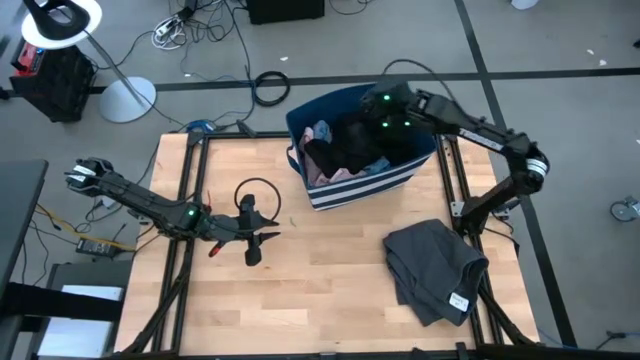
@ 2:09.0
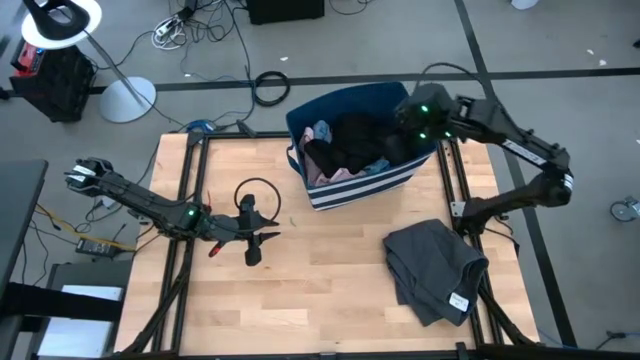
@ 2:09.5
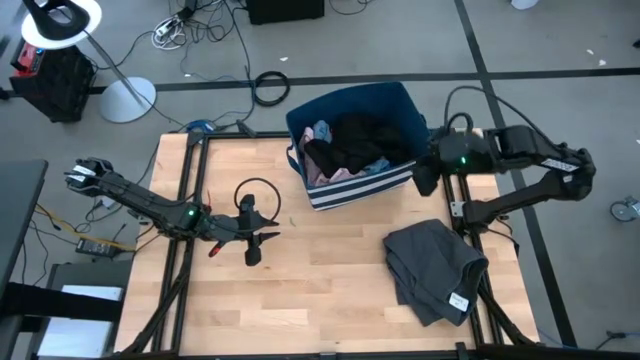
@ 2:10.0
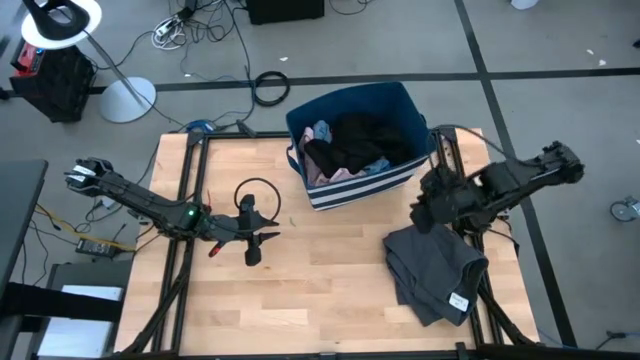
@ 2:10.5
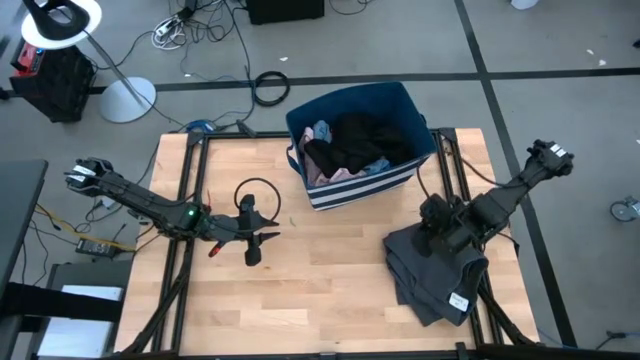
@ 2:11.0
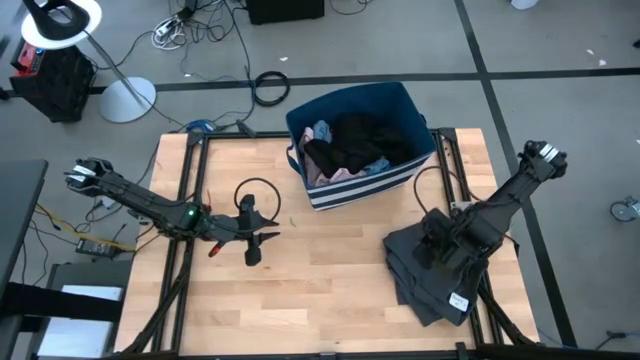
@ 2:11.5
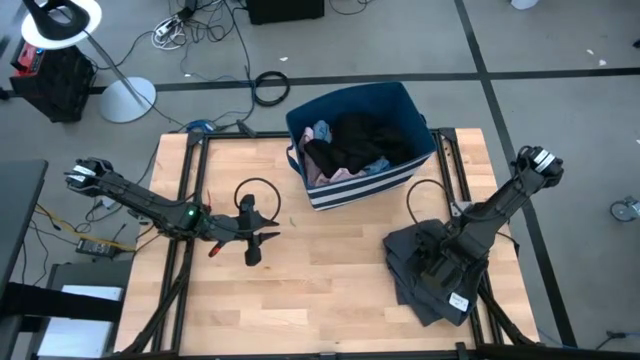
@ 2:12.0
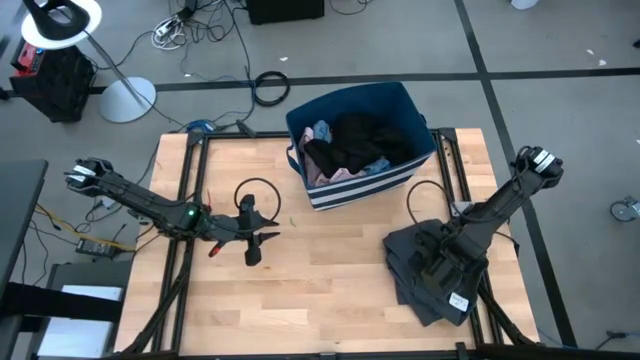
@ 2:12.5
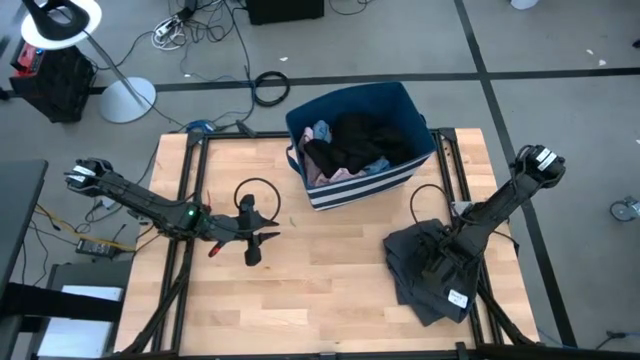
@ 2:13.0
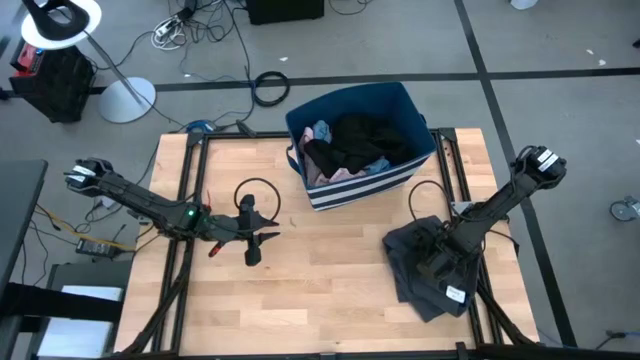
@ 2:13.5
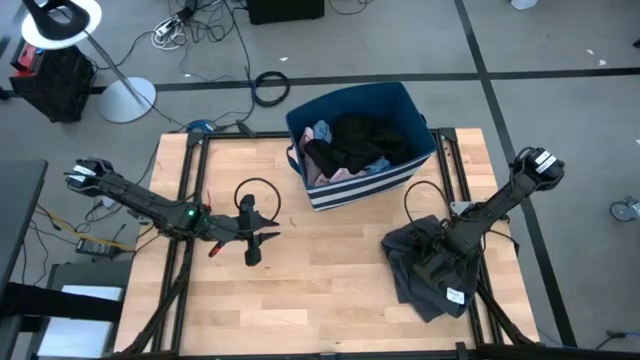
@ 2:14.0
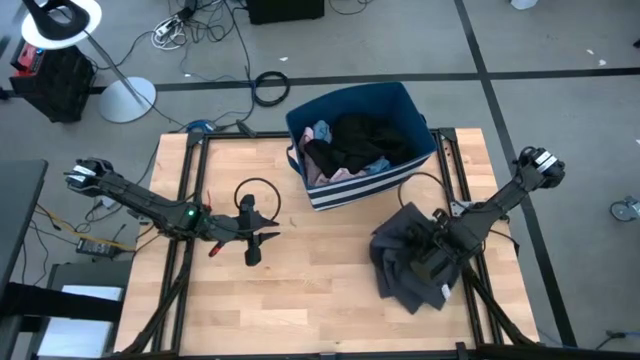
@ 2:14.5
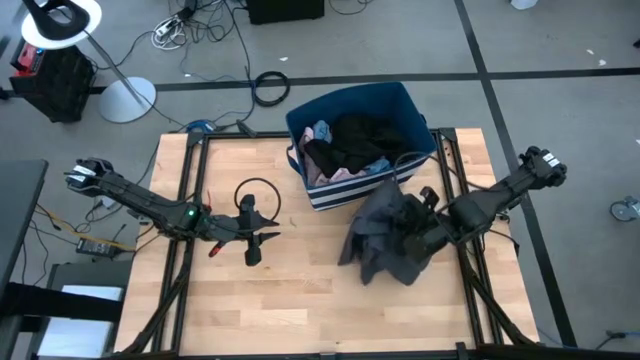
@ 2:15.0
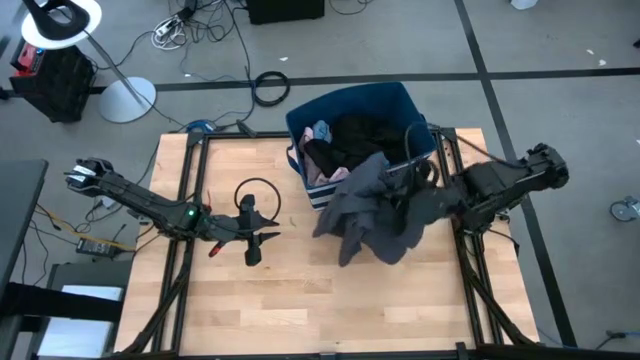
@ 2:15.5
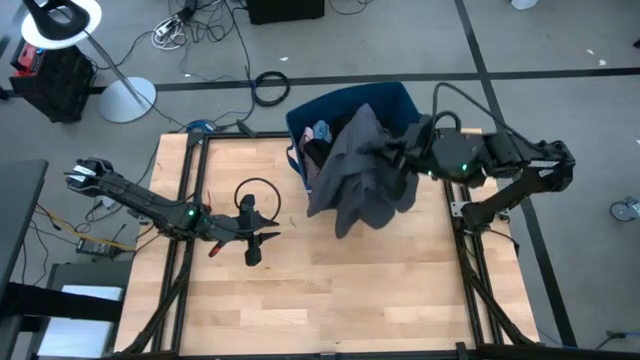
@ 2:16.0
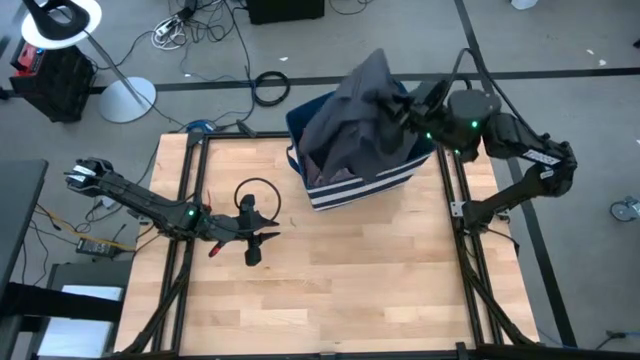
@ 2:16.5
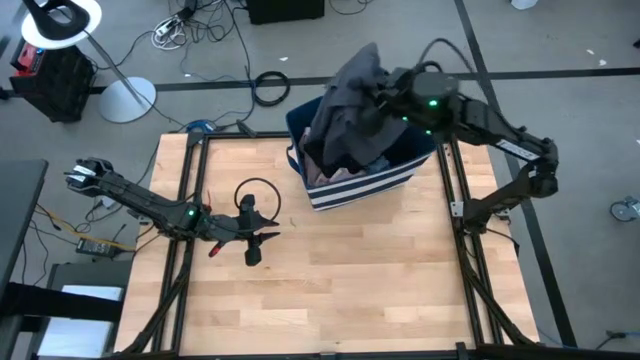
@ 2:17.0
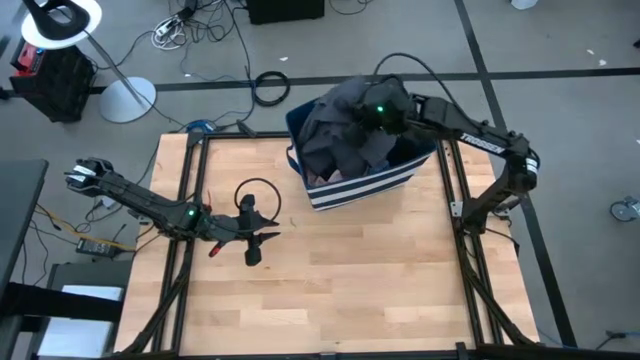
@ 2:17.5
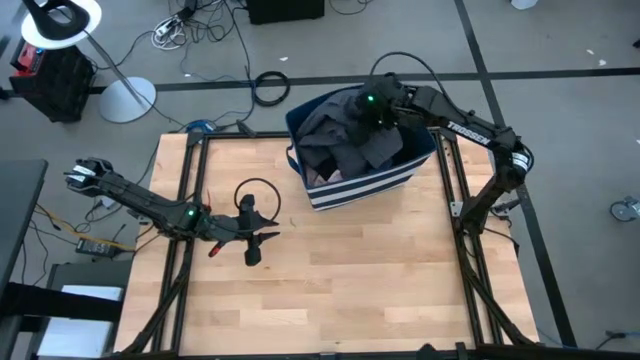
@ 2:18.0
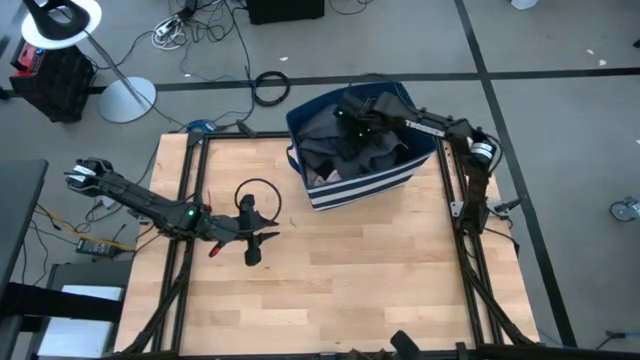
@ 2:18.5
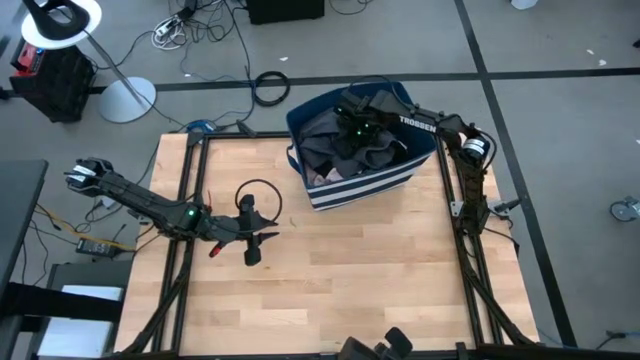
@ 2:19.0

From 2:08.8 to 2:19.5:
Task: Sort clothes
Put the gray shorts in the blue laundry bin organizer

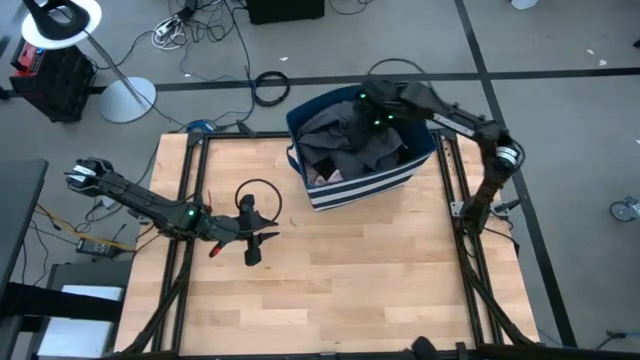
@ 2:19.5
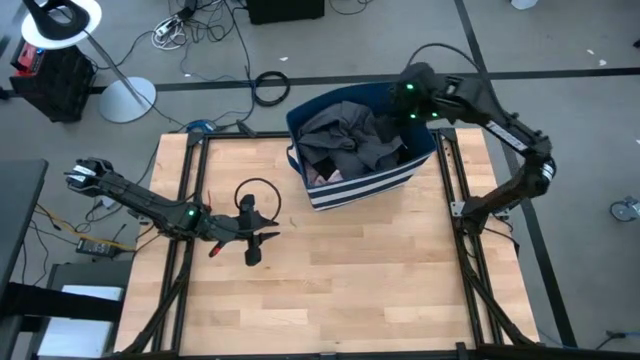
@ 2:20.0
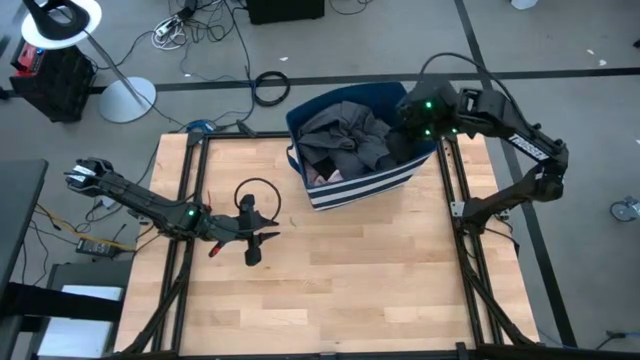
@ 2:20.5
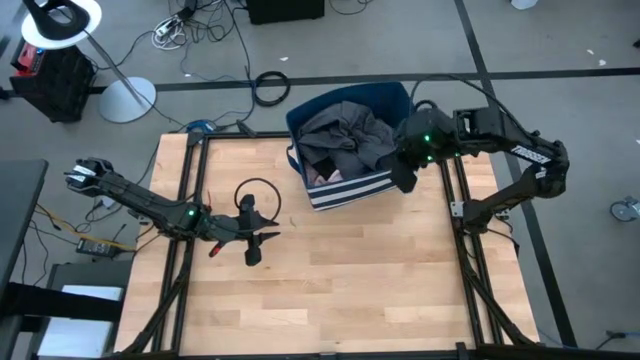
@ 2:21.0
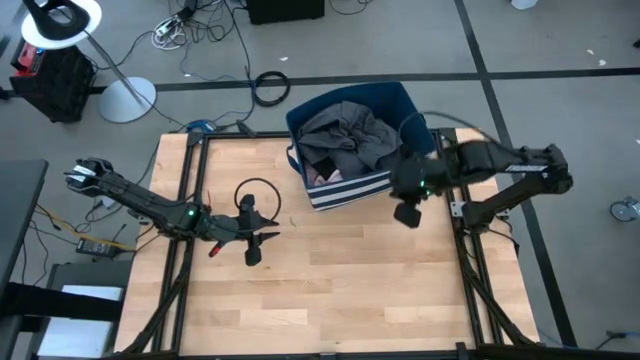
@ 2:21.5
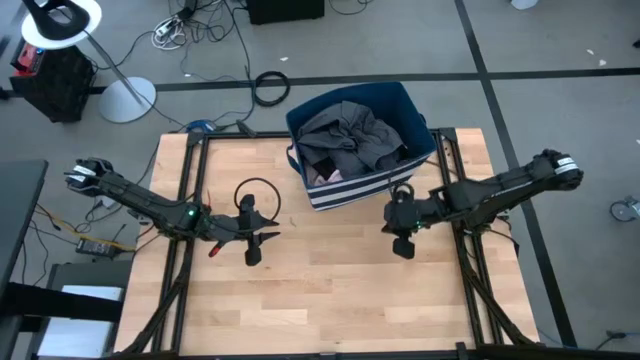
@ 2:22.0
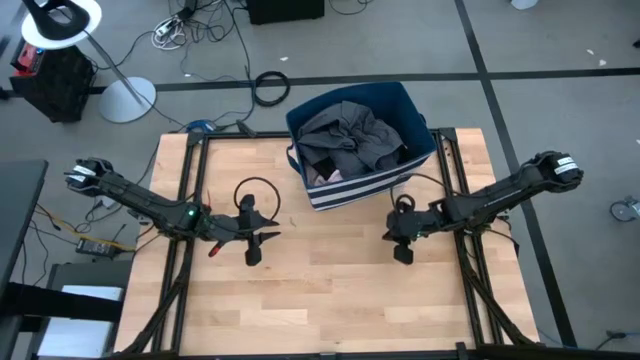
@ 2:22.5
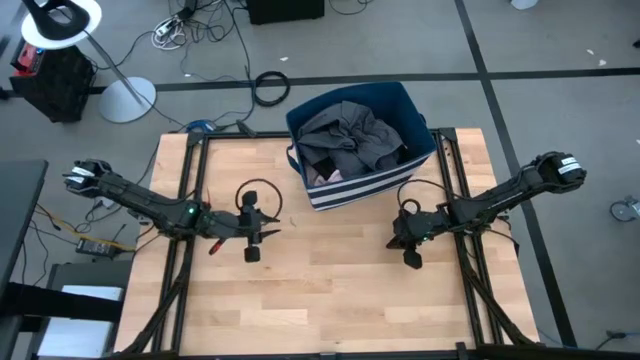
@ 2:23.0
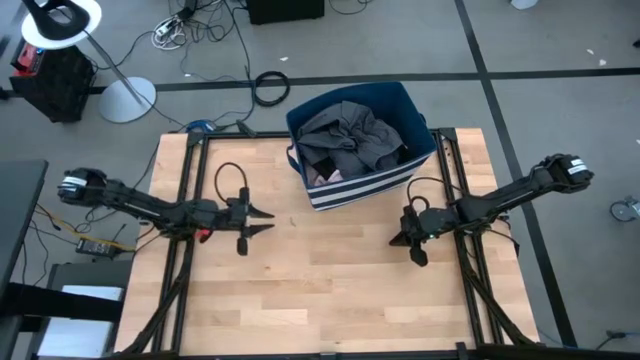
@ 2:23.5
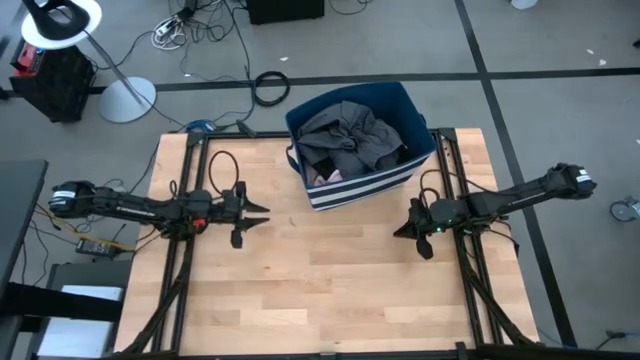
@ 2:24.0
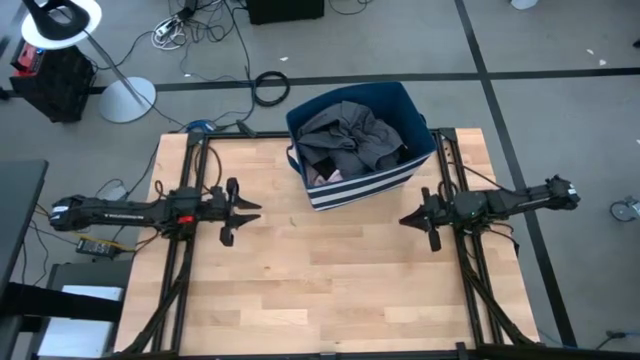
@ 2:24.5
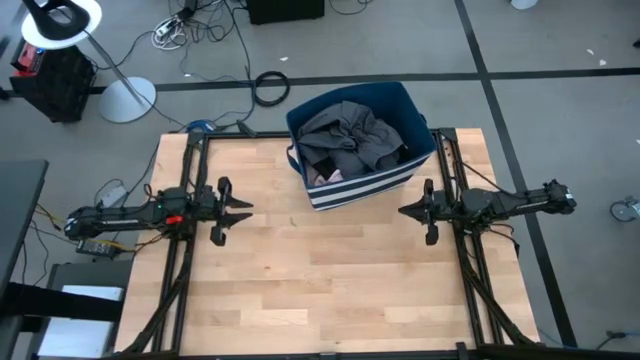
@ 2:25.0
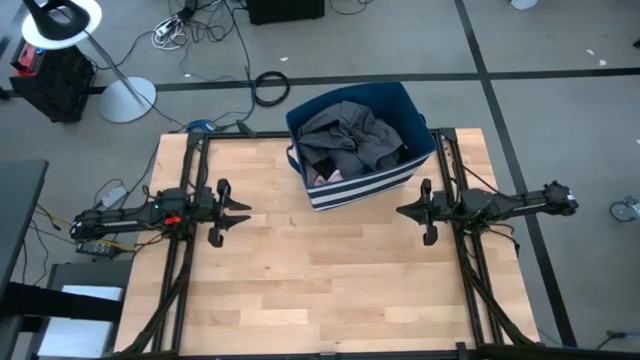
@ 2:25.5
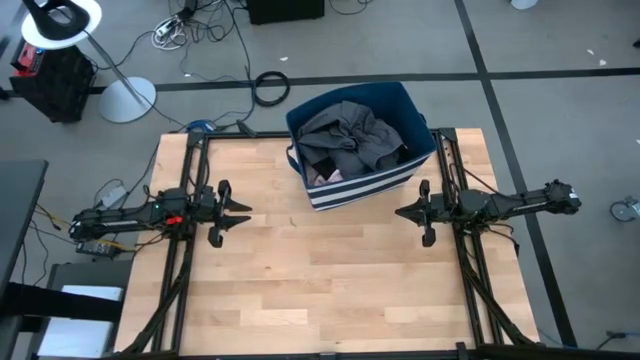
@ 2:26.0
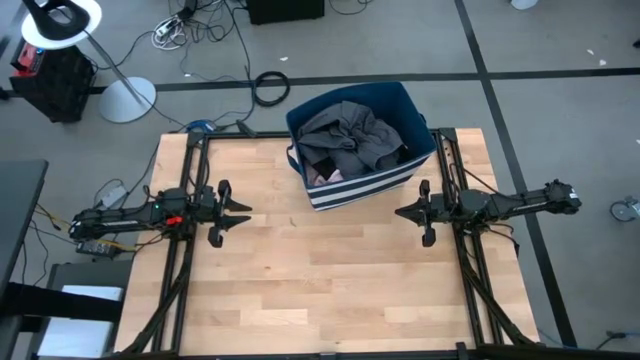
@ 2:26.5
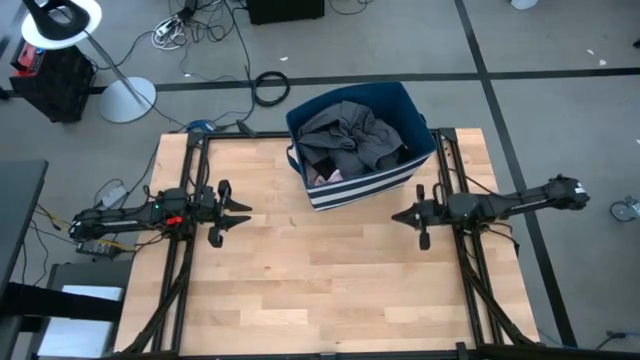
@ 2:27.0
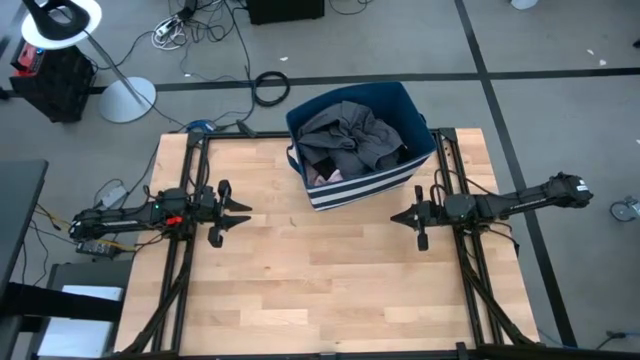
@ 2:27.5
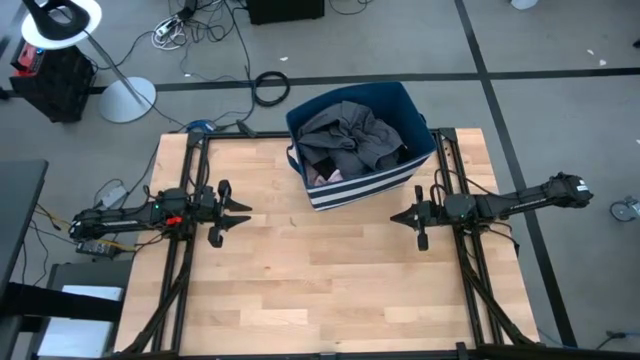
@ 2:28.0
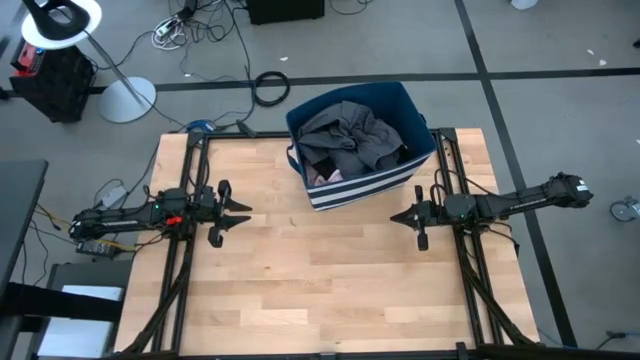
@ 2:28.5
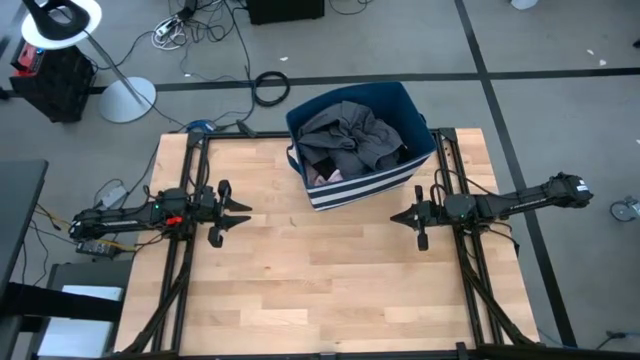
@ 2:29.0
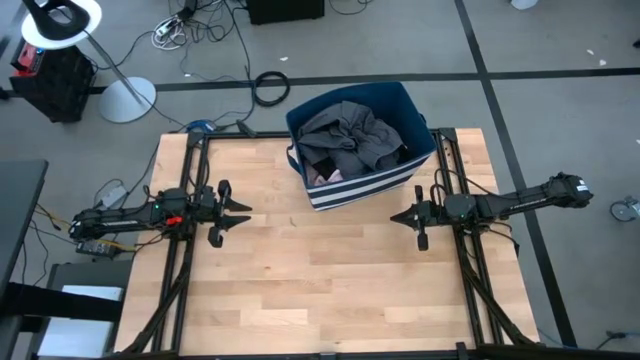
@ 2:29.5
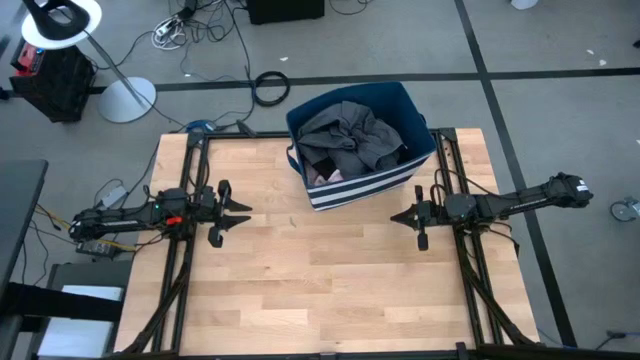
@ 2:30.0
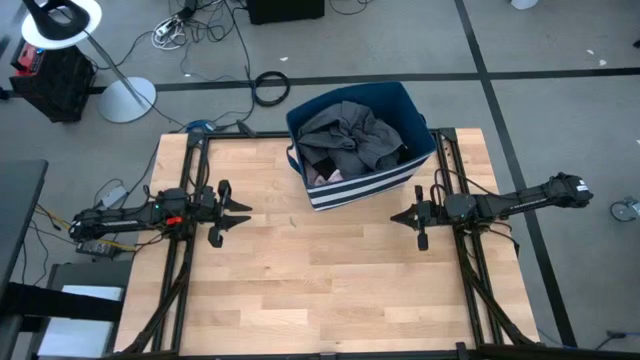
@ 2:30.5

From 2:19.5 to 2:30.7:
Return to Home Position

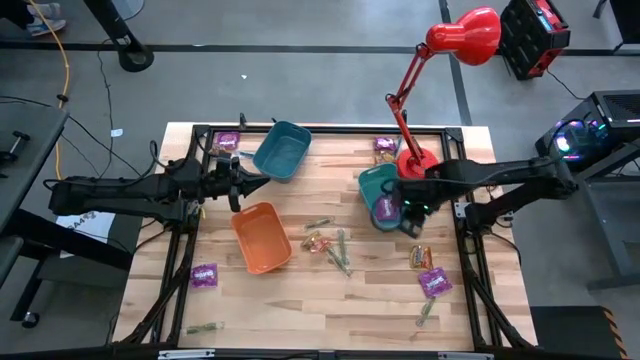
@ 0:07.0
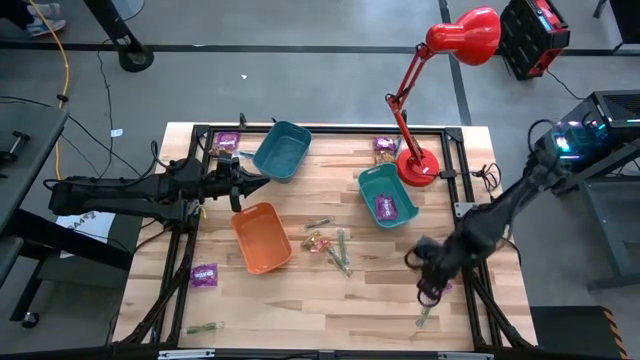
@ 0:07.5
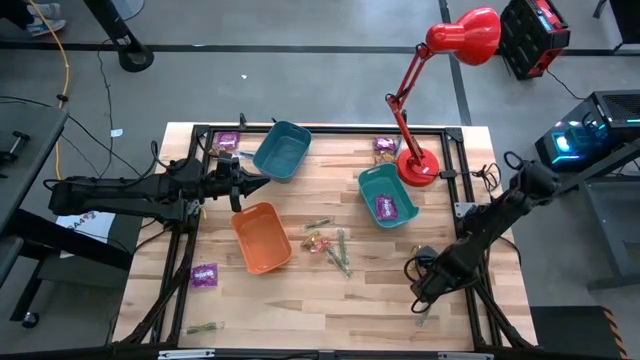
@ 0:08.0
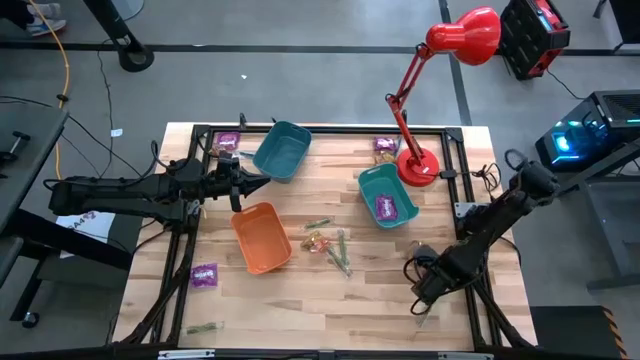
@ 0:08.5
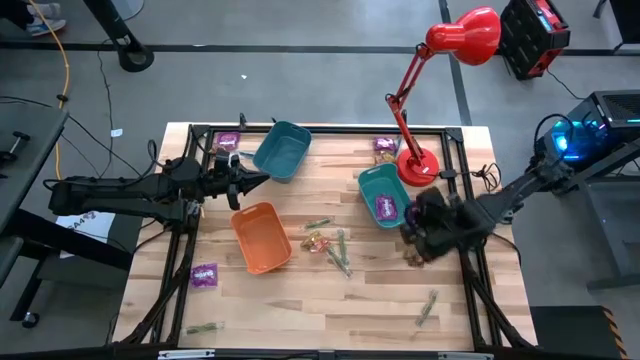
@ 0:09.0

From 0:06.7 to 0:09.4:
Task: Sort candy
Put the purple candy into the green bin
